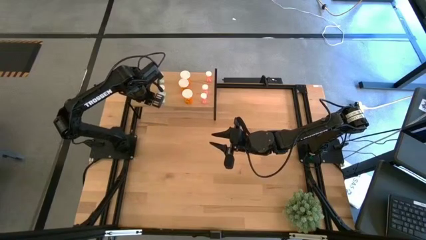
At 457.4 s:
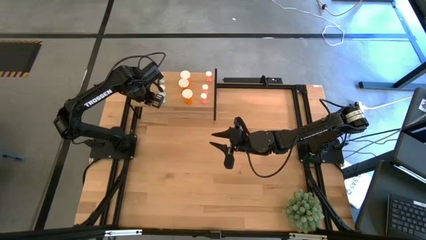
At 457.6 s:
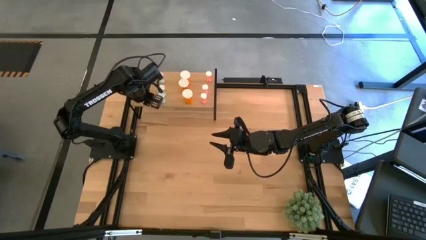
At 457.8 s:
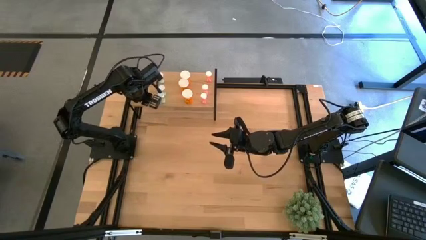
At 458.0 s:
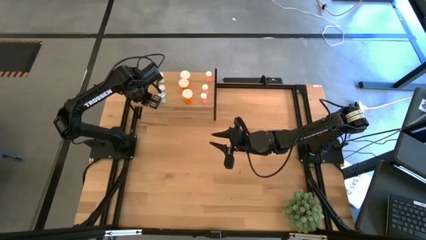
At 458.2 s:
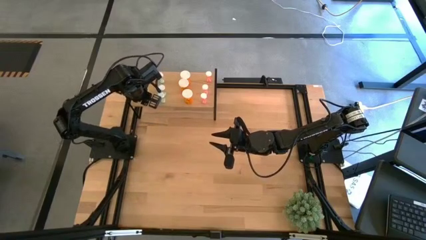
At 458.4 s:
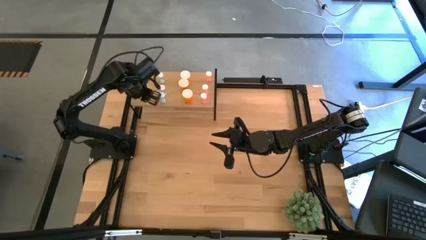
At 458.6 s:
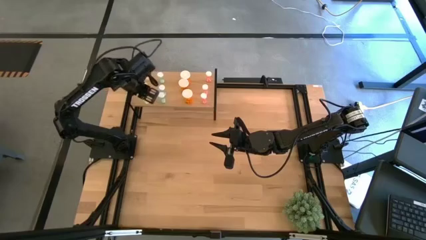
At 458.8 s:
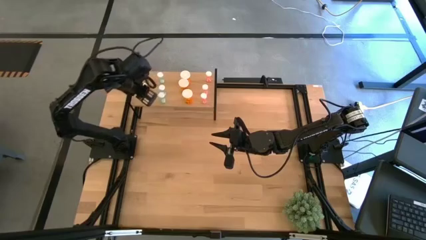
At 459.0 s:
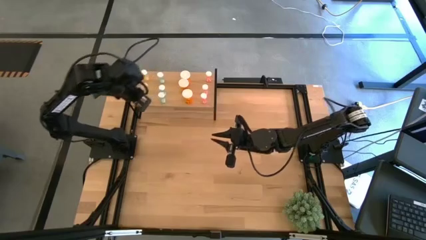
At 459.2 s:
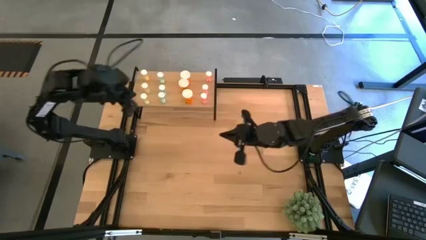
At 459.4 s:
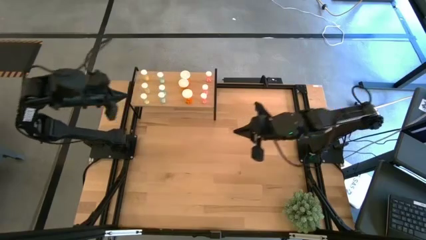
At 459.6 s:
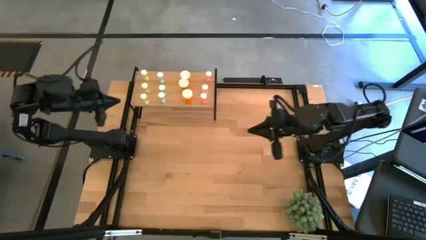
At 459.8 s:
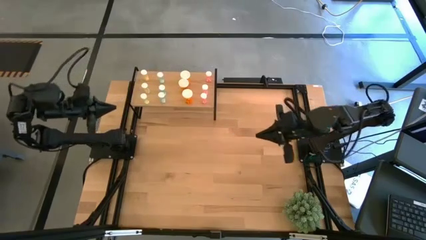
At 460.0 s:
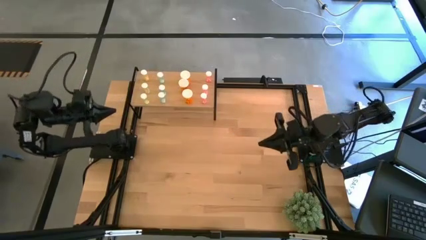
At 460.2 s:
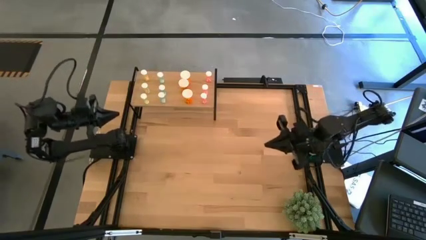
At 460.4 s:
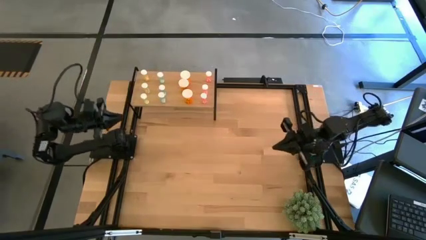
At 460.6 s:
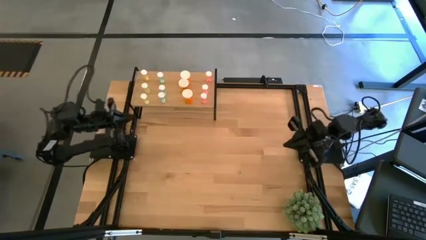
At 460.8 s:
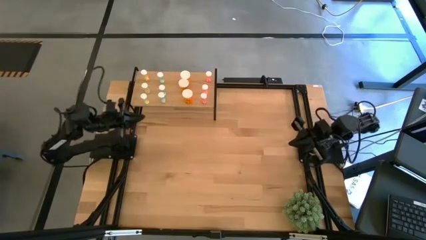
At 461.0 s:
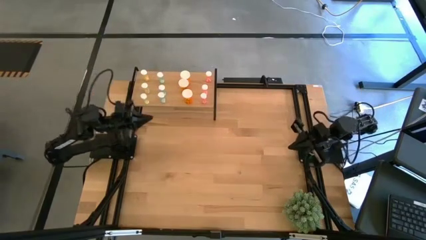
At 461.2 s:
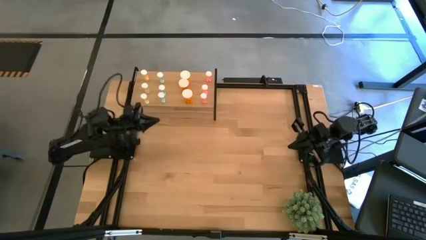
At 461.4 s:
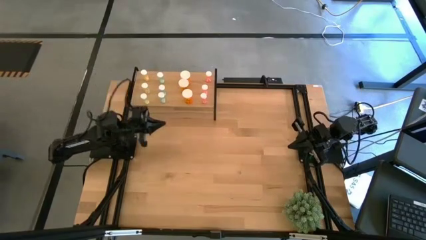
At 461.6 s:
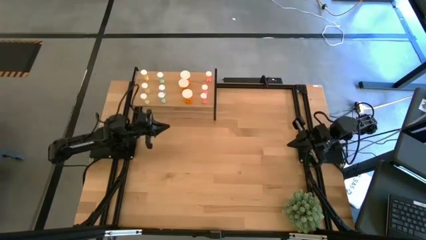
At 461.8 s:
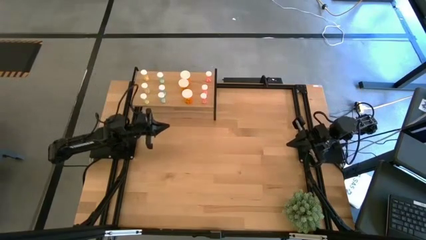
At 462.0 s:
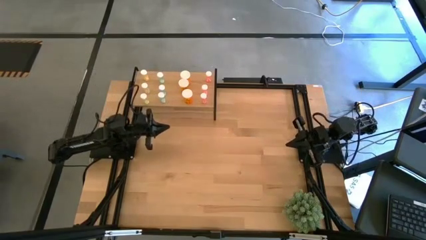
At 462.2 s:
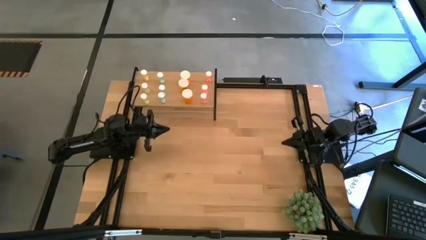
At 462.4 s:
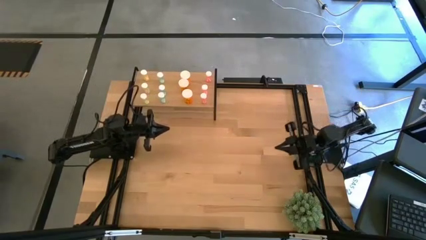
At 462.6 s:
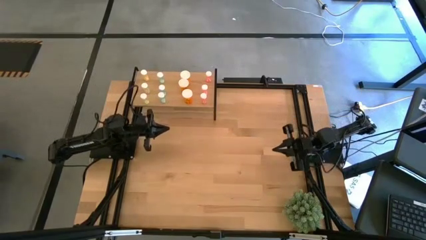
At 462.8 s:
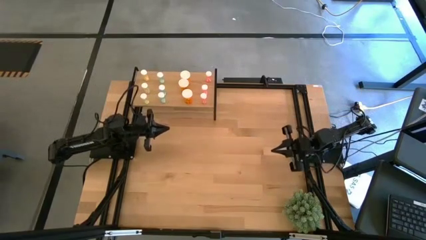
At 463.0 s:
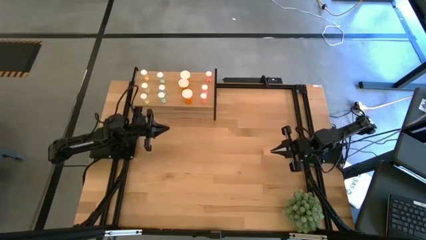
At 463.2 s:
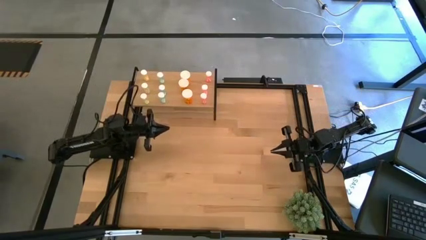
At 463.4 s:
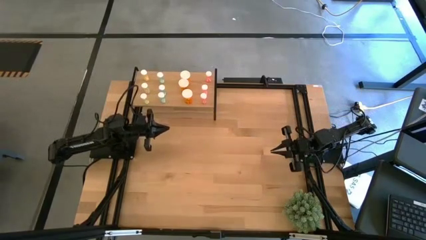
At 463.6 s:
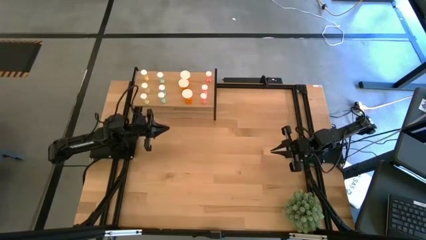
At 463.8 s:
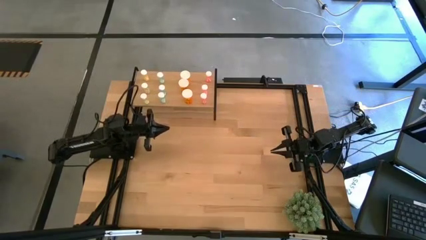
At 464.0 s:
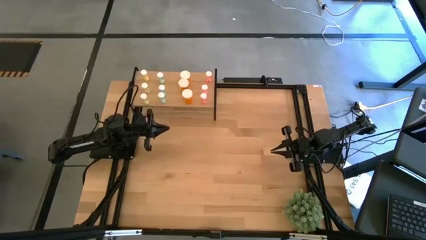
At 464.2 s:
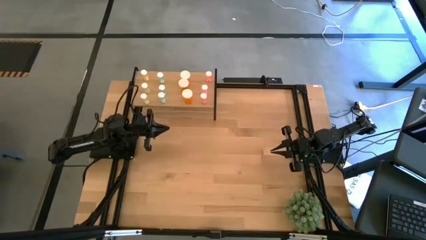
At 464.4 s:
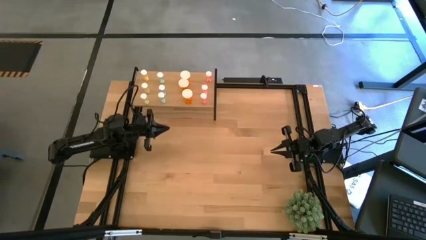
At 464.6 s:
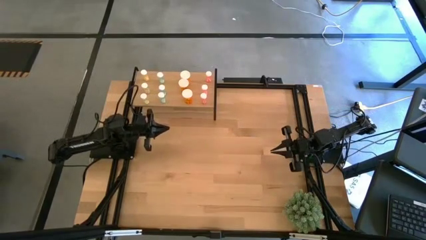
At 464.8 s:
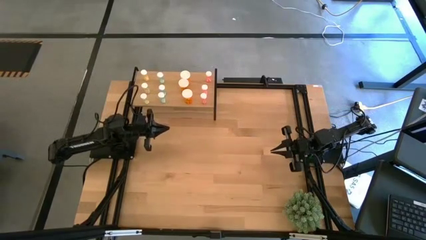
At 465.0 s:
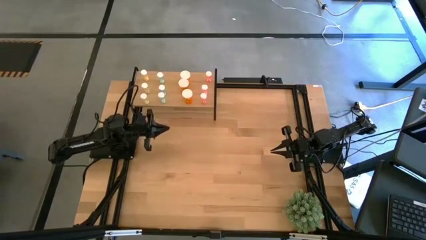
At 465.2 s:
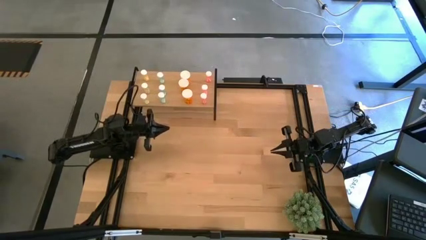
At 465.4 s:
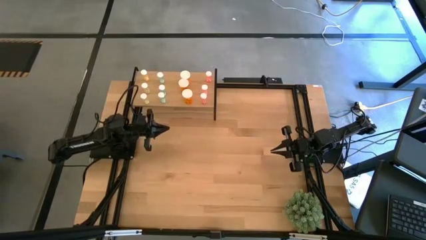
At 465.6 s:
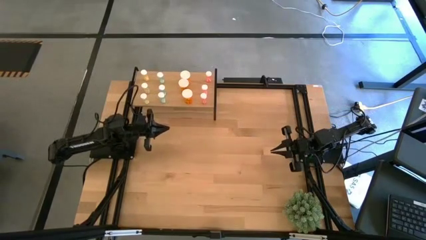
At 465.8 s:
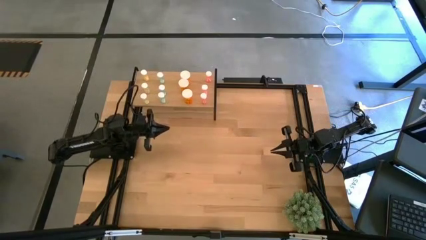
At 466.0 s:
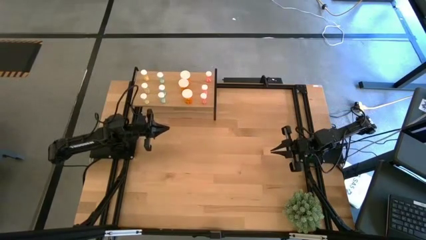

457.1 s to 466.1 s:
Task: Pick and place medicine bottles onto shelf by color
Return to Home Position

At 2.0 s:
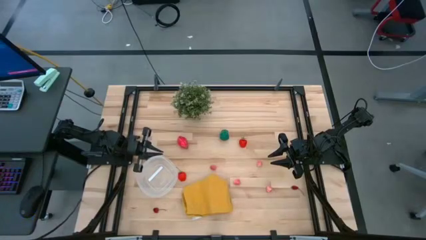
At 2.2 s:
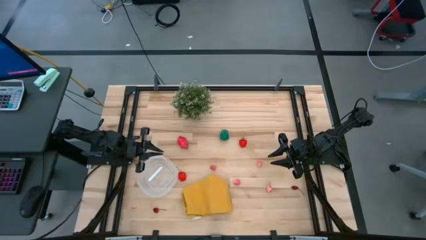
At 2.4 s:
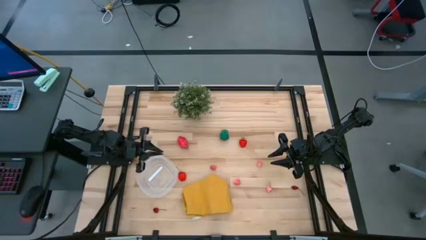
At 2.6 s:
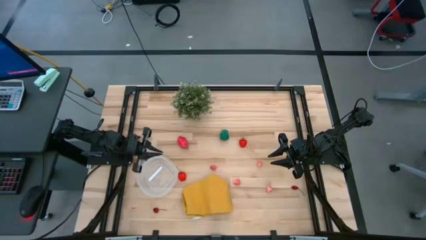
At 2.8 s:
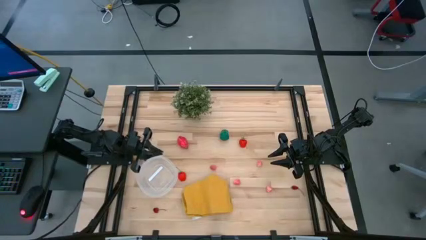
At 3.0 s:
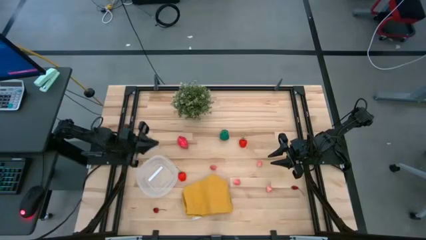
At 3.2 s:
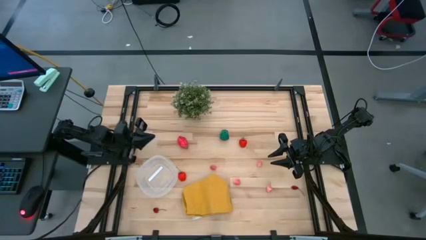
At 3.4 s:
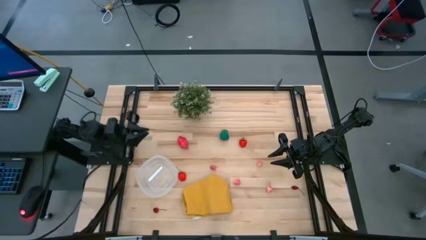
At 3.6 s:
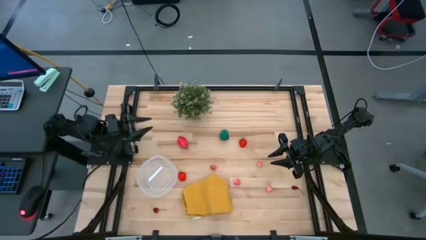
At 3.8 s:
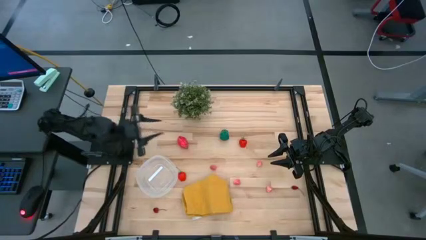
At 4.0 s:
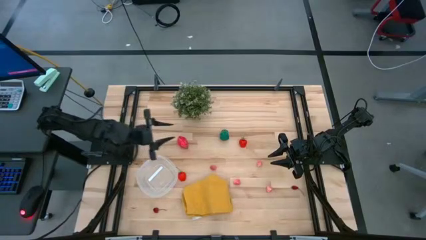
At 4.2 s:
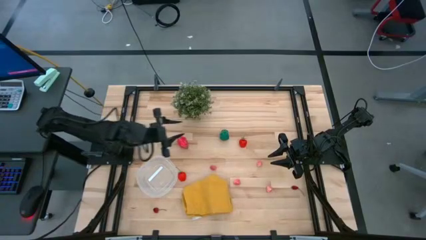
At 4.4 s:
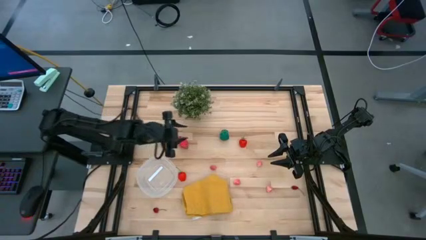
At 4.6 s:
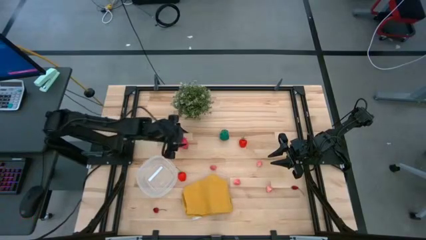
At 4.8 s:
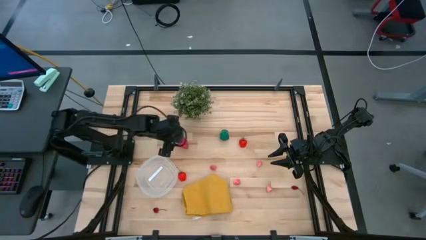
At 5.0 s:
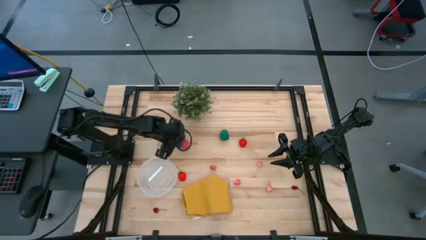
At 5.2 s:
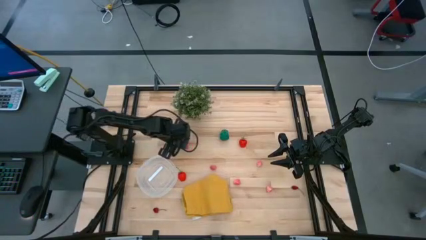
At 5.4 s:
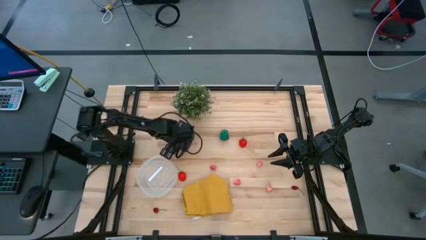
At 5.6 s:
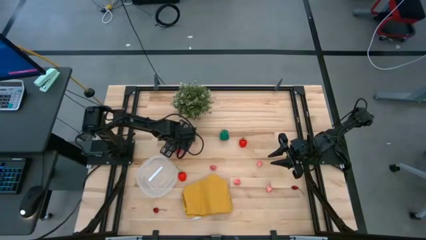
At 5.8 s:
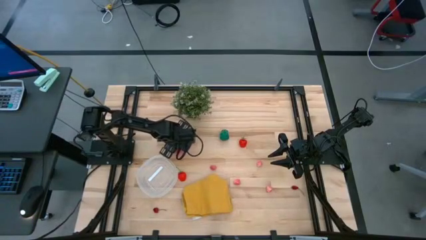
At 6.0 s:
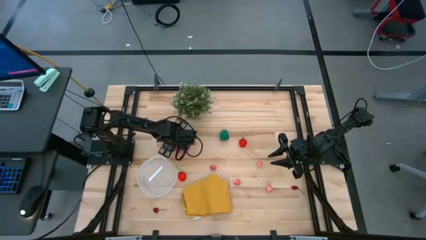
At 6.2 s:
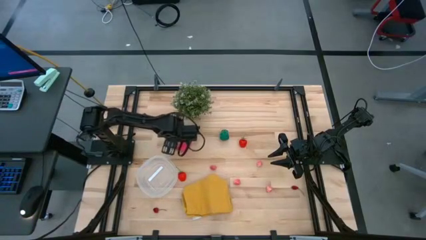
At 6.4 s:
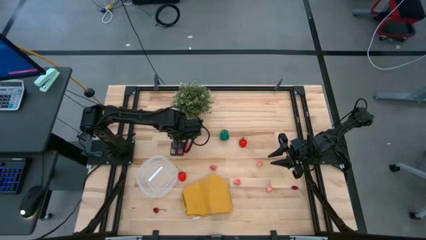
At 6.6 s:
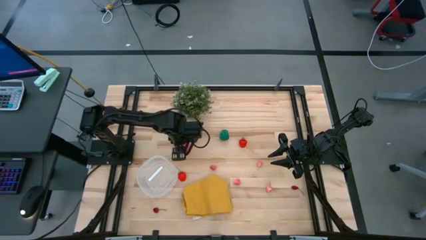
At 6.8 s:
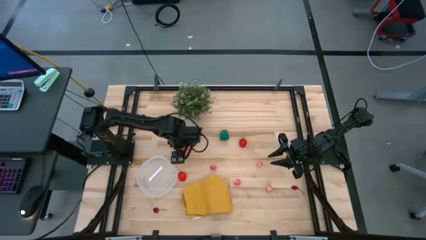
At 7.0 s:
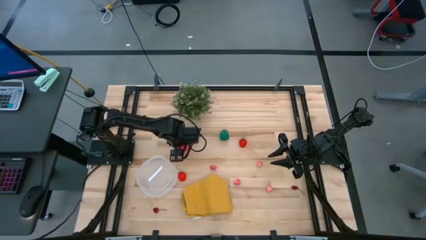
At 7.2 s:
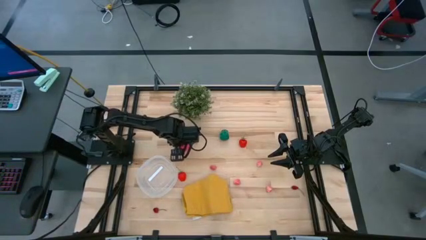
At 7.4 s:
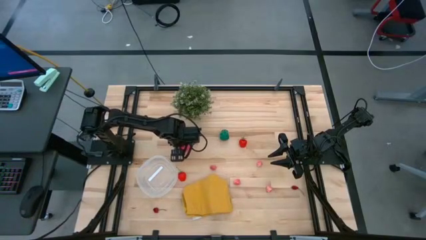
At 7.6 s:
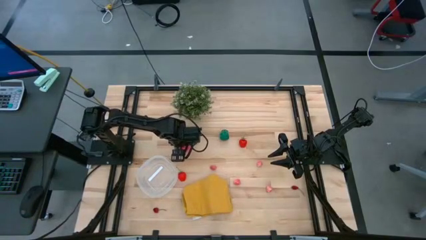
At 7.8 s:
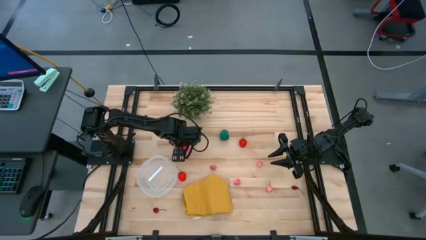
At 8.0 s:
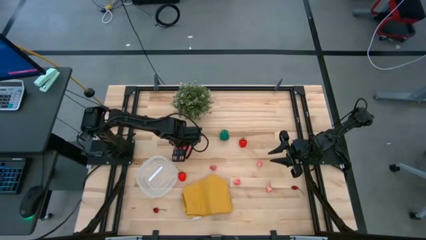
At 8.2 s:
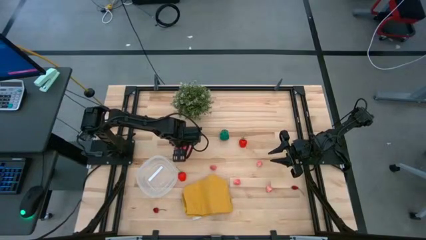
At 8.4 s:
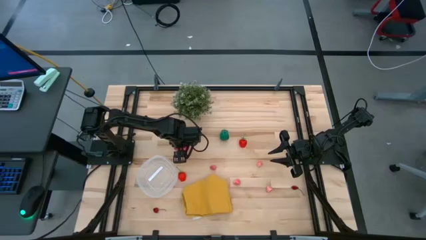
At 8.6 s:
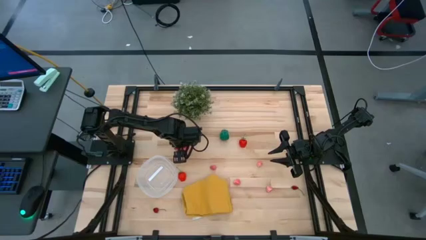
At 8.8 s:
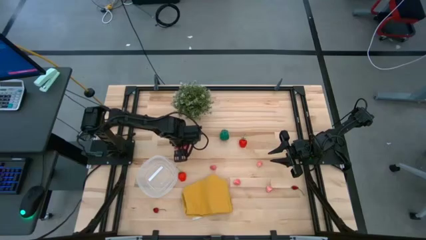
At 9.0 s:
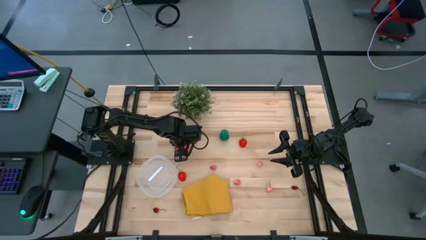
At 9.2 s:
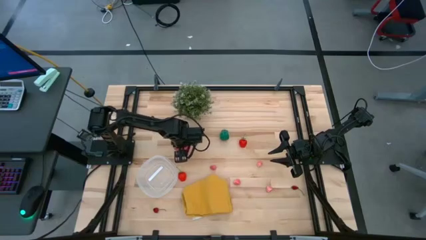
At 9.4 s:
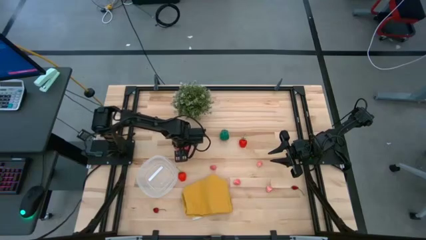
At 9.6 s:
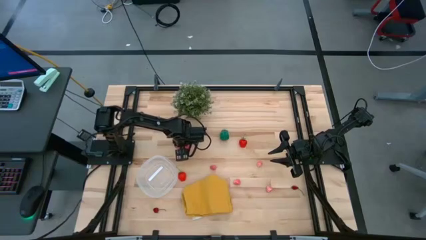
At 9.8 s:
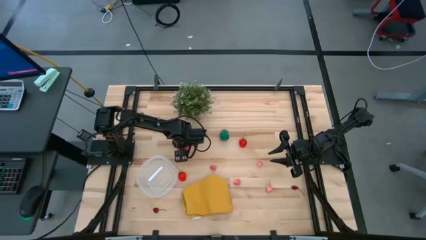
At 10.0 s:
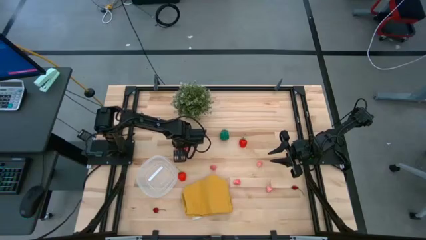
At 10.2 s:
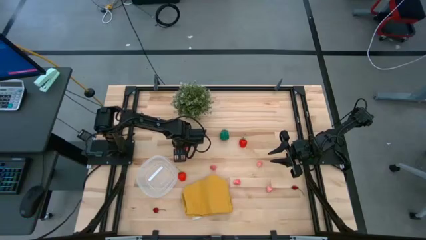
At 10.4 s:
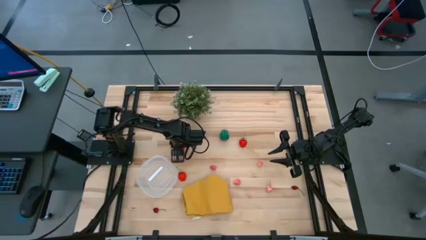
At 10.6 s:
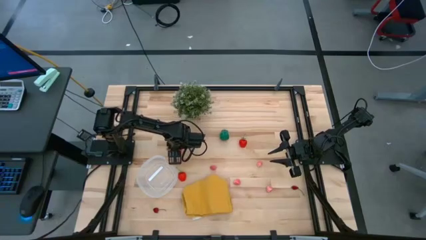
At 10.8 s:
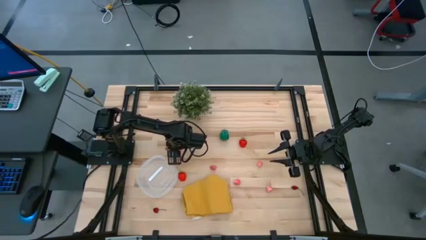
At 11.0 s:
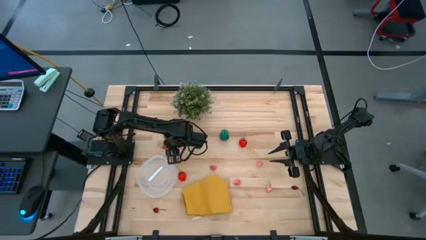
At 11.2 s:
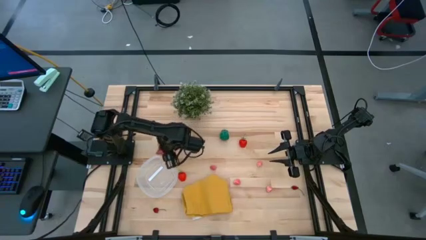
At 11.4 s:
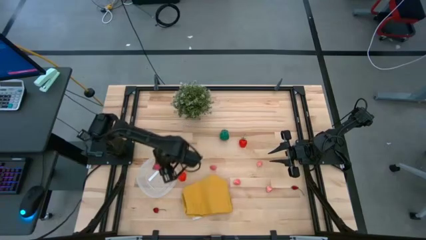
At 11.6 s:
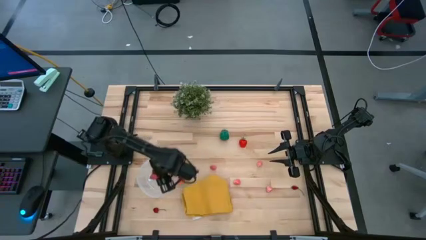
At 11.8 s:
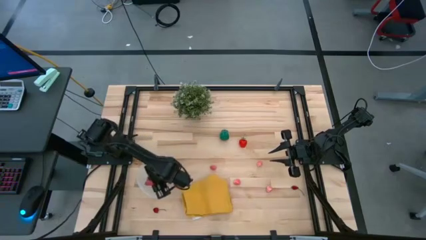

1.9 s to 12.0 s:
Task: Pick and placing Produce into tupperware
Put the dragon fruit into the transparent bin
